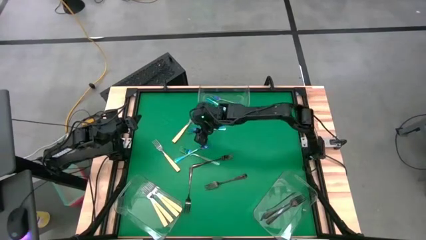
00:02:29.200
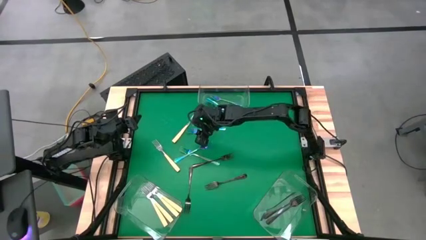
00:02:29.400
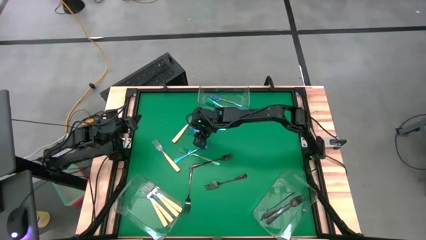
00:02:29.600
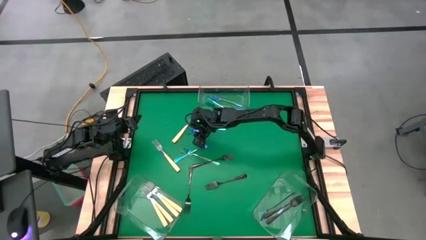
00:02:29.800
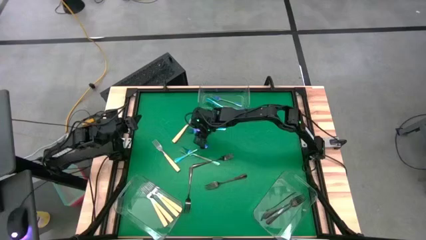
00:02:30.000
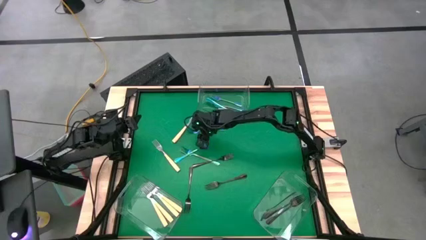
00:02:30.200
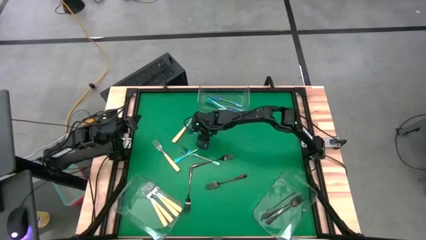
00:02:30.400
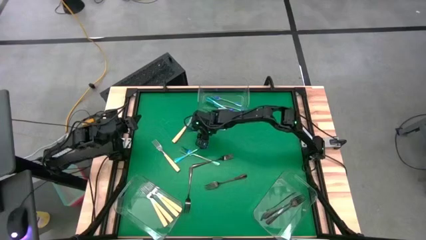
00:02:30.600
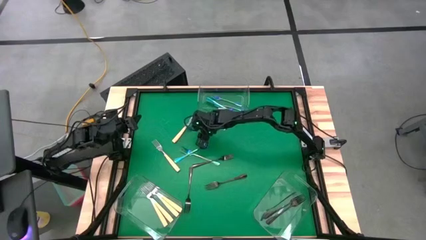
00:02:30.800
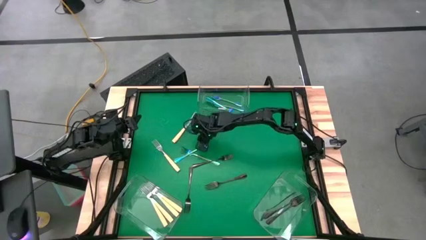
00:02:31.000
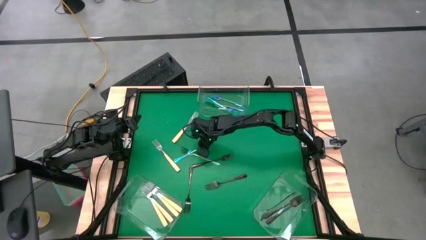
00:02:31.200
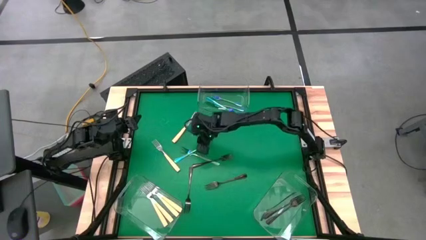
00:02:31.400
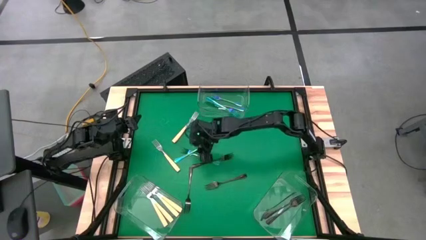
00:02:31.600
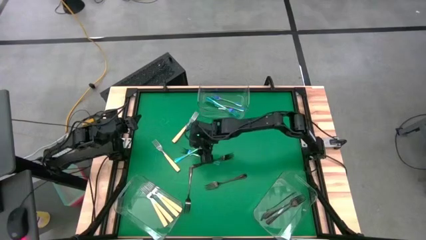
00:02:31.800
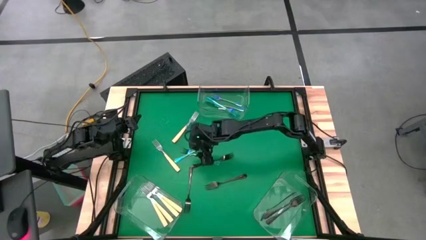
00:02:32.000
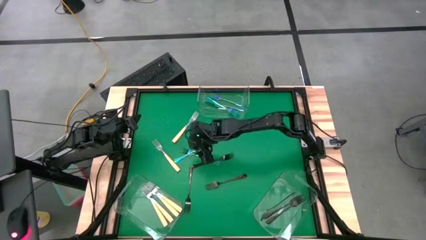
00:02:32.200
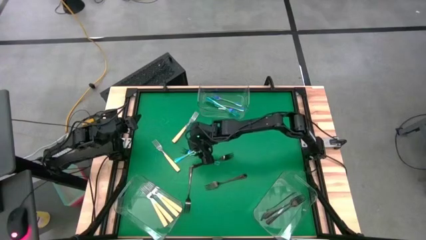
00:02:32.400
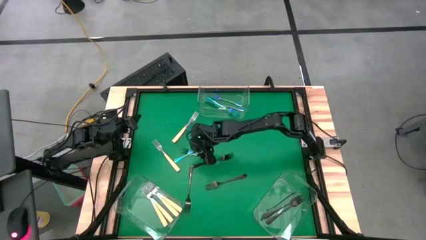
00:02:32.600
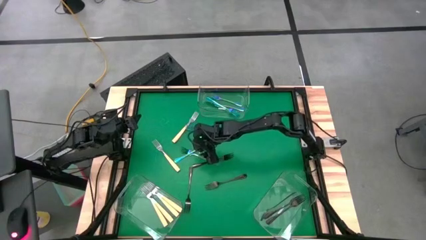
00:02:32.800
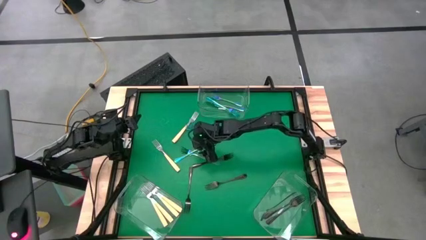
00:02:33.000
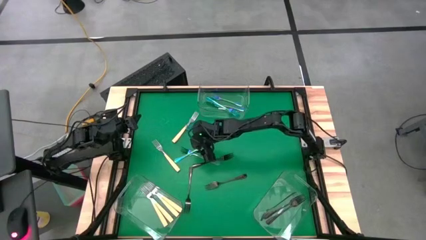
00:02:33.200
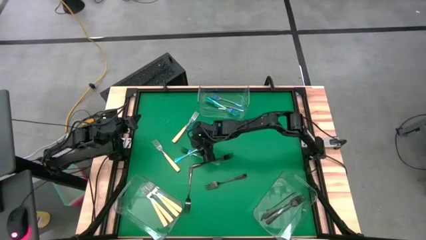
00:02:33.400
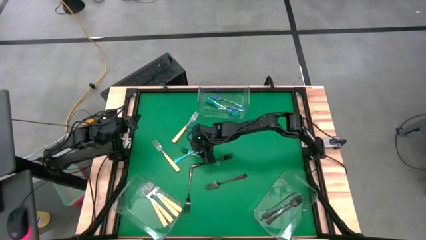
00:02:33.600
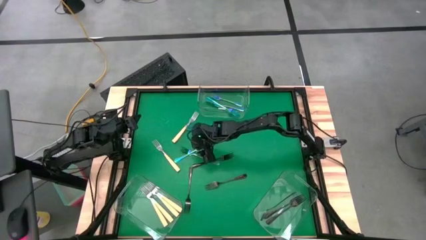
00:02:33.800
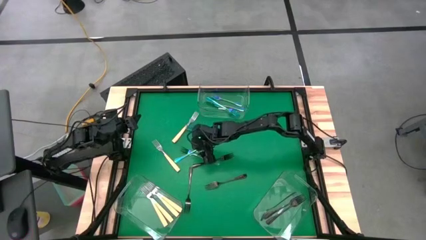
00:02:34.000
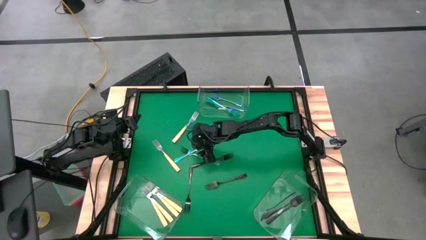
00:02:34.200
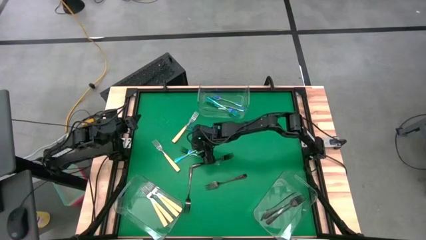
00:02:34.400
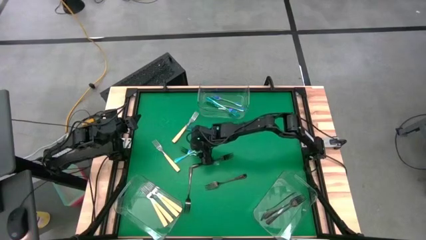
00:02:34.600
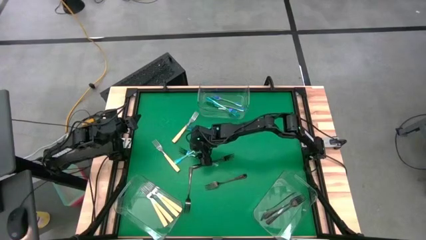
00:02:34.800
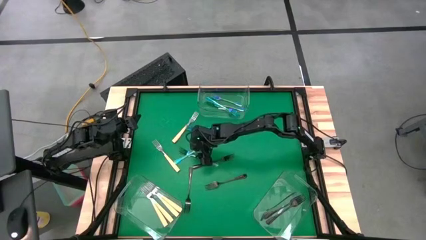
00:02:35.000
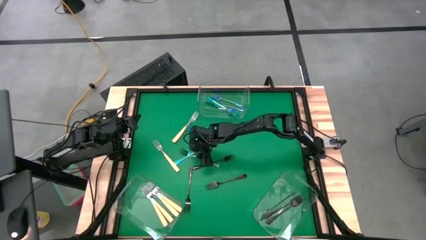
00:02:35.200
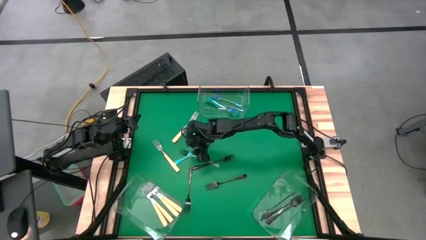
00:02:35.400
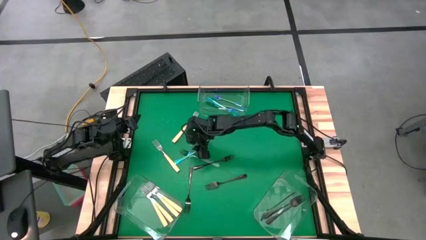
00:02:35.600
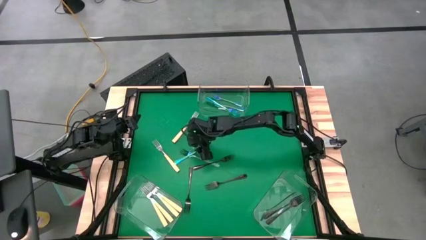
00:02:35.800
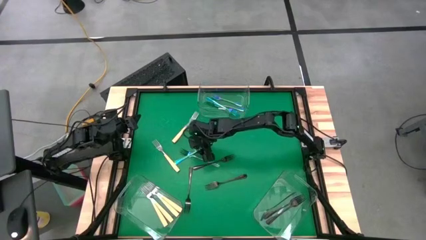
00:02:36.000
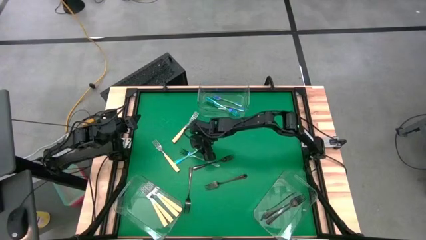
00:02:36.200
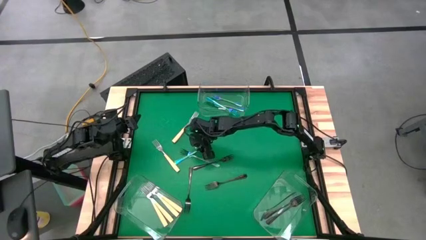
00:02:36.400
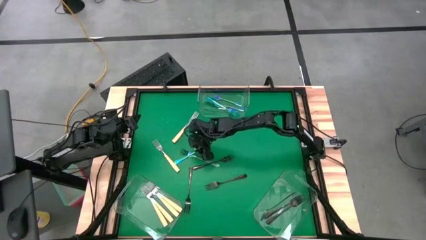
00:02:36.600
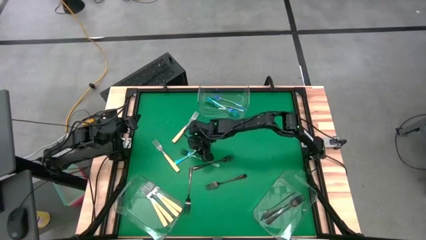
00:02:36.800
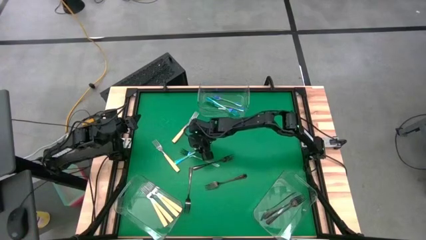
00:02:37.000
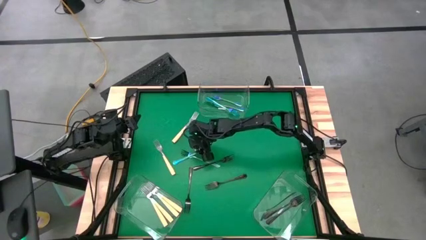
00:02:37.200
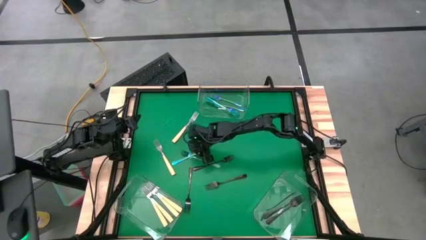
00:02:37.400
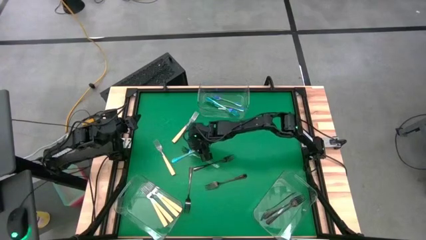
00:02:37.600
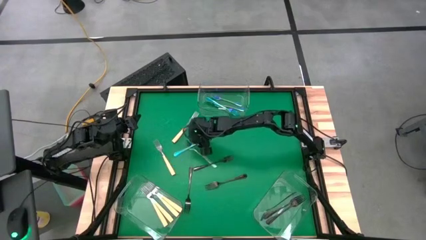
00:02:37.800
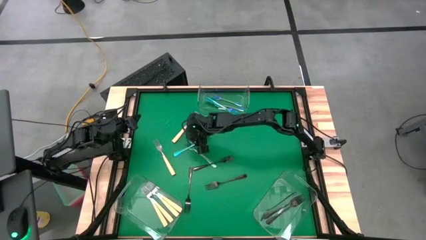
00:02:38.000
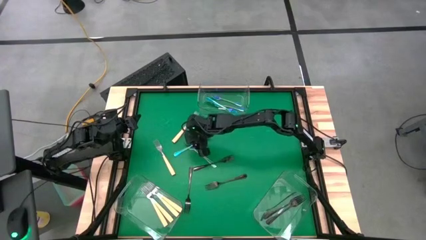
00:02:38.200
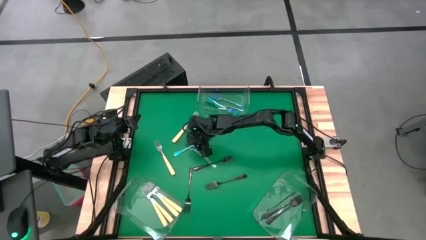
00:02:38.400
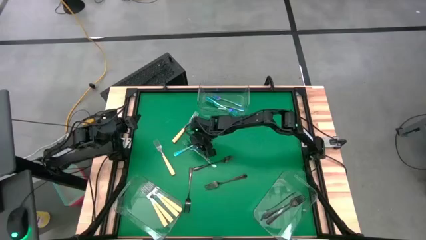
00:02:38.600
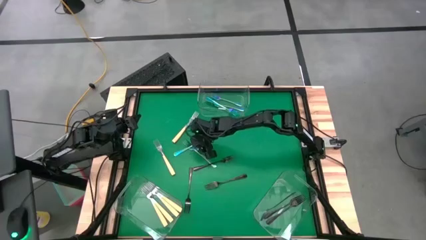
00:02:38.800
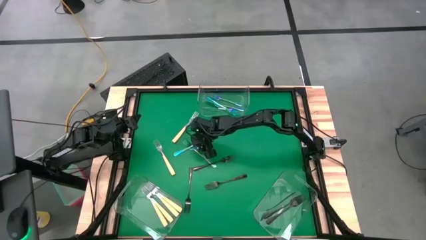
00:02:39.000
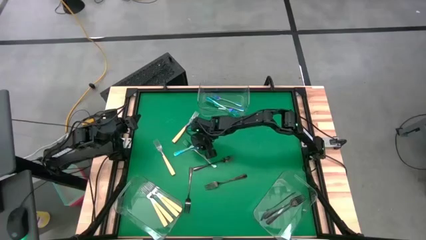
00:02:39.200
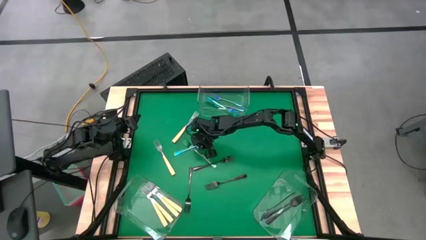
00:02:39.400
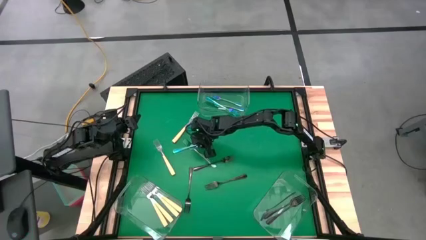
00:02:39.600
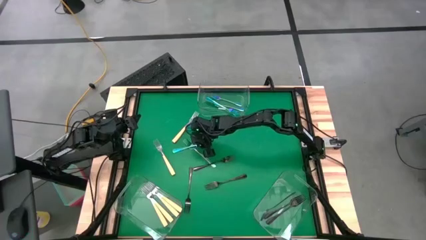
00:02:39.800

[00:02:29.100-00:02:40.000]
Task: Sort silverware by color (type)
Put the blue fork into the top transparent bin

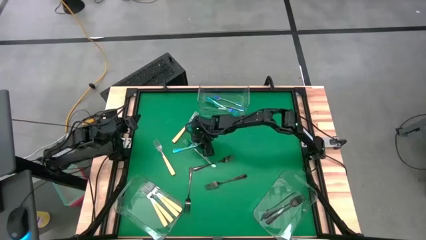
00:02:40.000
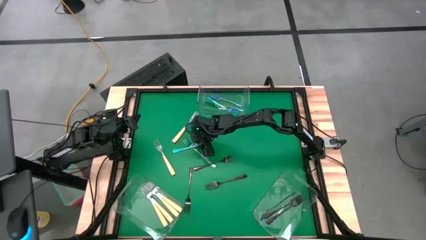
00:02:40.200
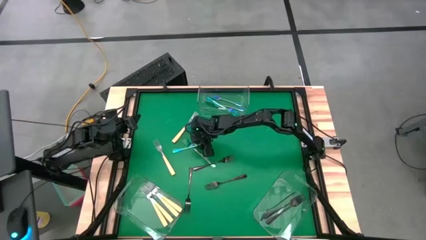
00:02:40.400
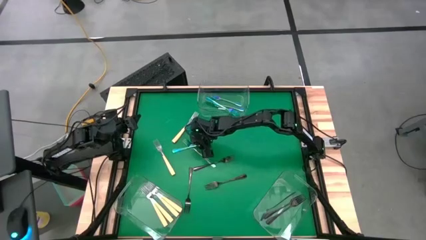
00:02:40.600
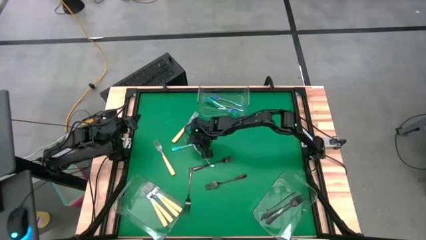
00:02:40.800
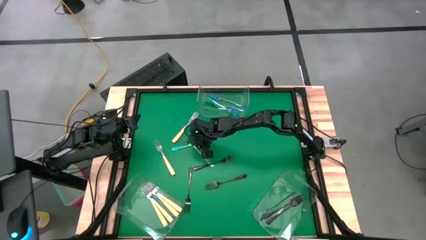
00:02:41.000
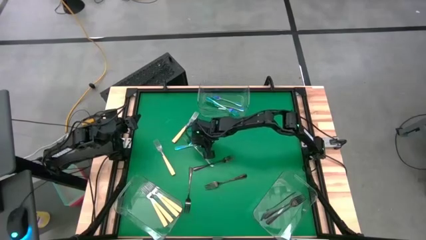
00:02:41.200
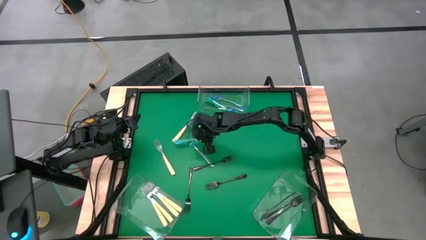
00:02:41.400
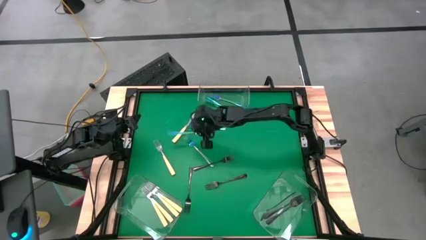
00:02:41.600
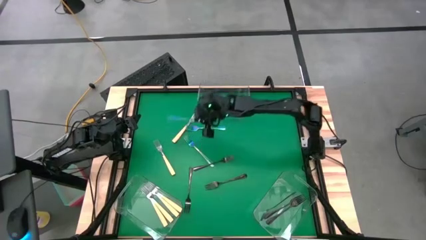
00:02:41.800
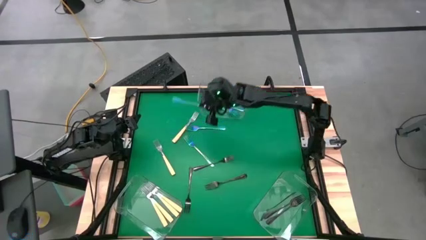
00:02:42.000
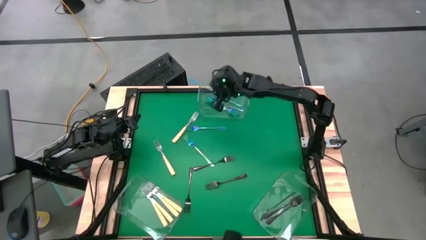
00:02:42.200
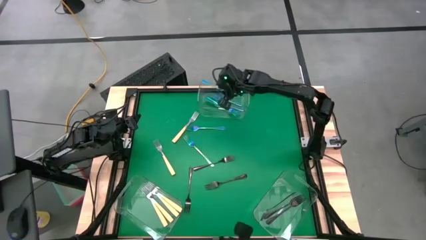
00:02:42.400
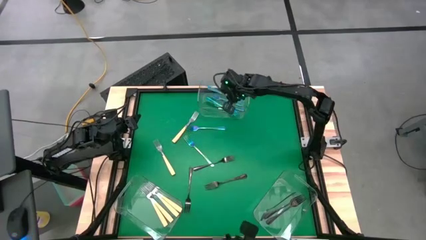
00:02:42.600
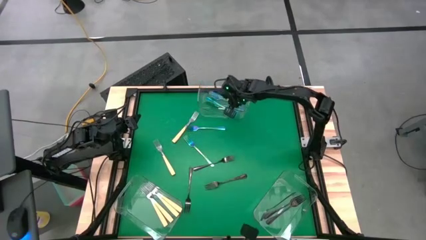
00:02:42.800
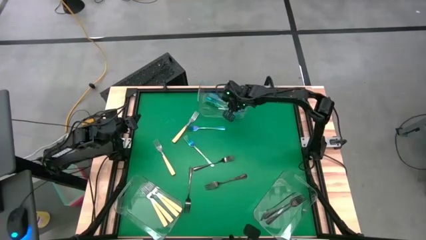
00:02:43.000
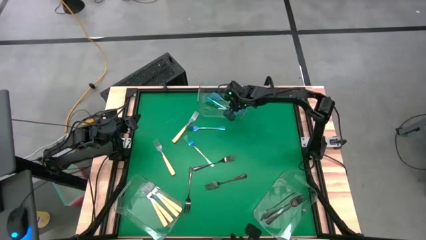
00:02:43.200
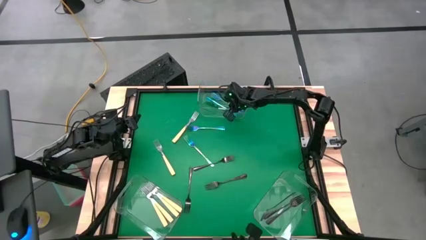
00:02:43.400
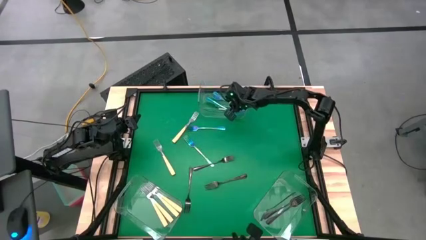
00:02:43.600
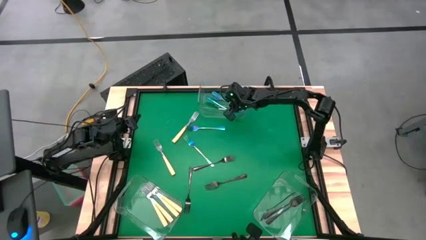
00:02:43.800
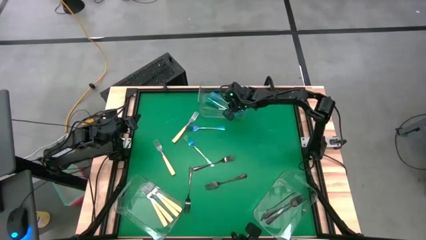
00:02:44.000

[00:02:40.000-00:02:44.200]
Put the blue fork into the top transparent bin

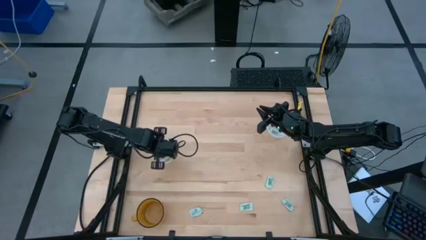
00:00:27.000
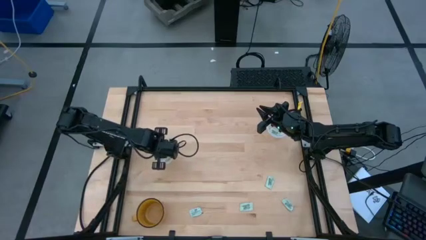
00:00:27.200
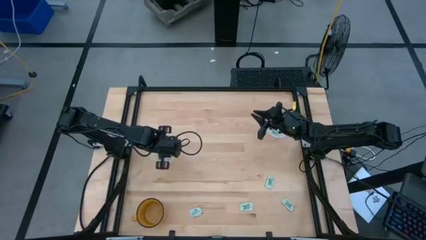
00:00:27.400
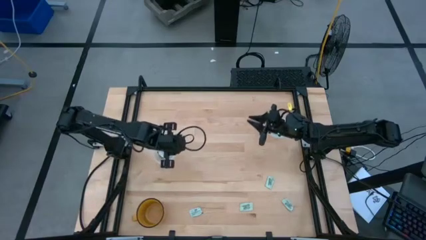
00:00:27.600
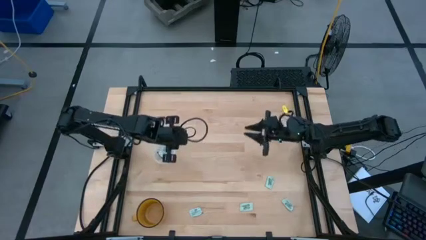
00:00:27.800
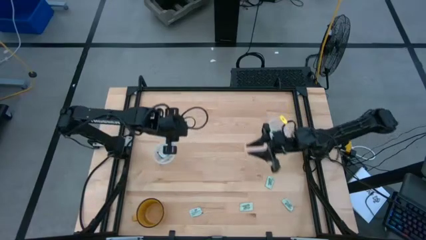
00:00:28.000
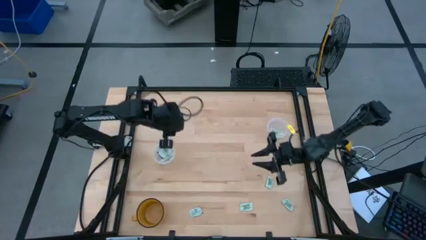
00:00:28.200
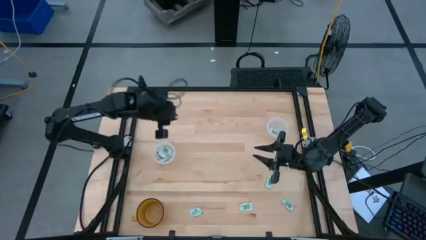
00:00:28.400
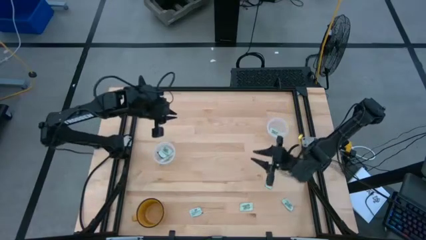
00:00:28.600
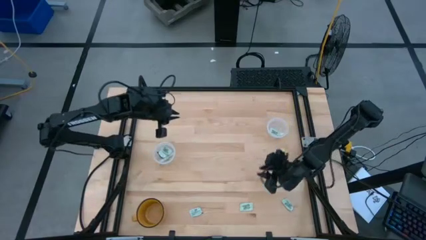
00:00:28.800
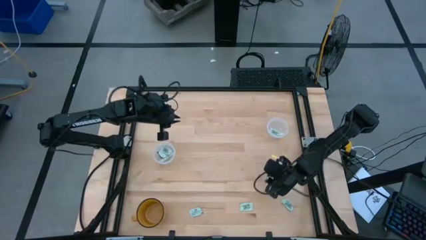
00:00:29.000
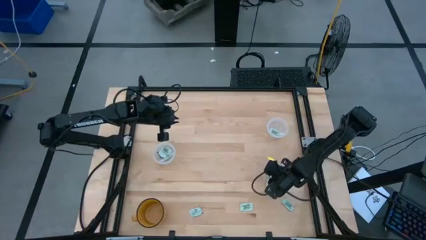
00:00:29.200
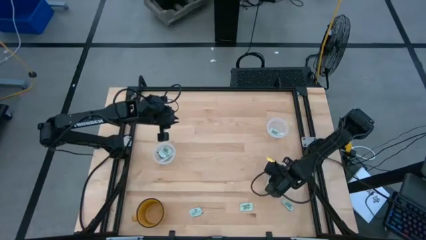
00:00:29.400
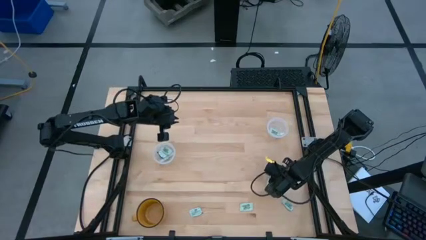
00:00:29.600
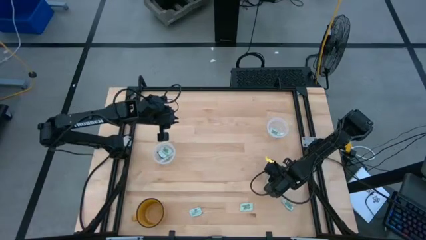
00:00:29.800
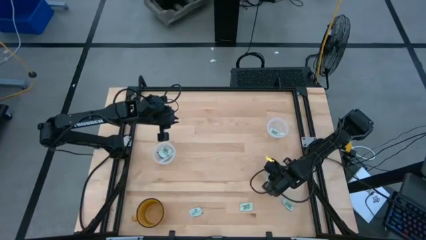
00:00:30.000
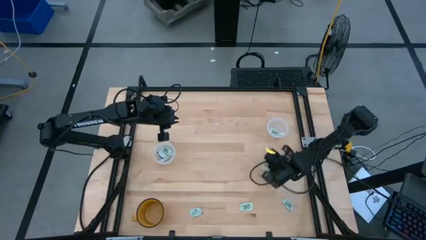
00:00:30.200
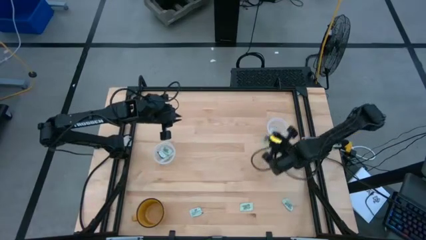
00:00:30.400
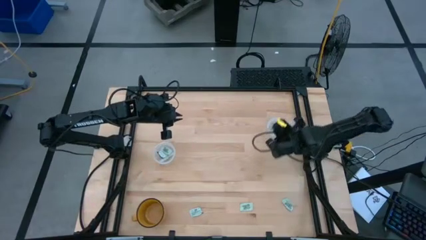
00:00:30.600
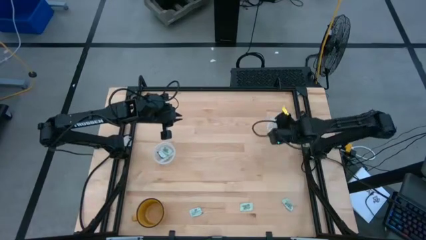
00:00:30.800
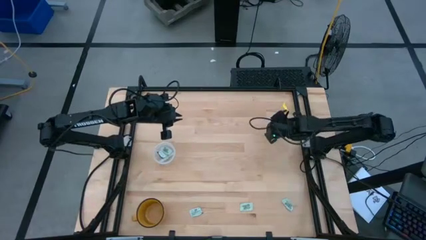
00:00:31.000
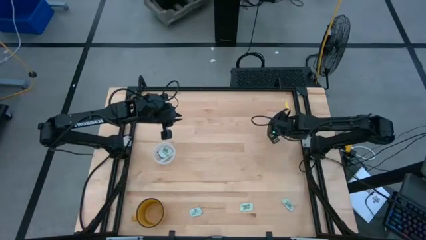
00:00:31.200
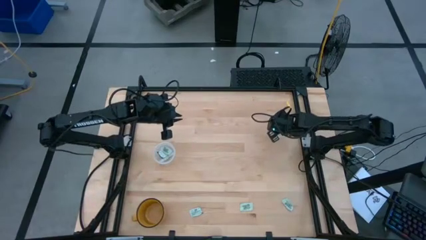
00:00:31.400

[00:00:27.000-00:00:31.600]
Task: Pick and place items into bin
Put the green stevia packet into the right transparent bin
